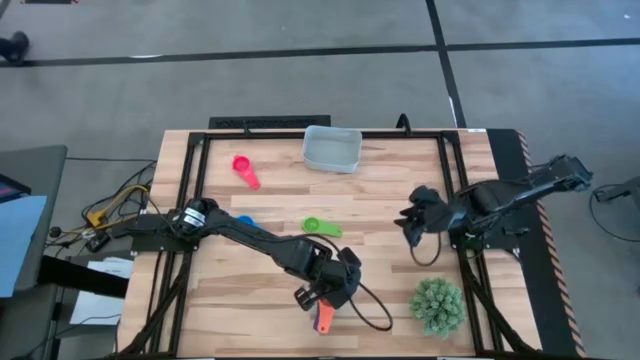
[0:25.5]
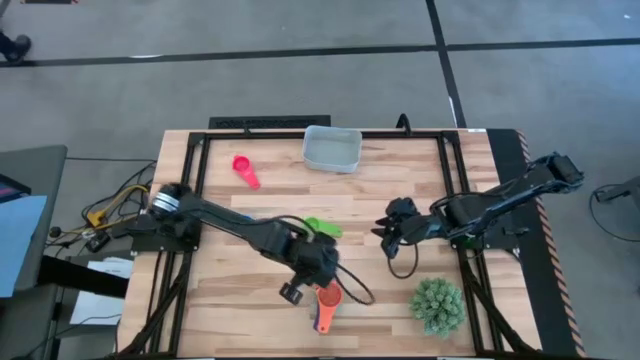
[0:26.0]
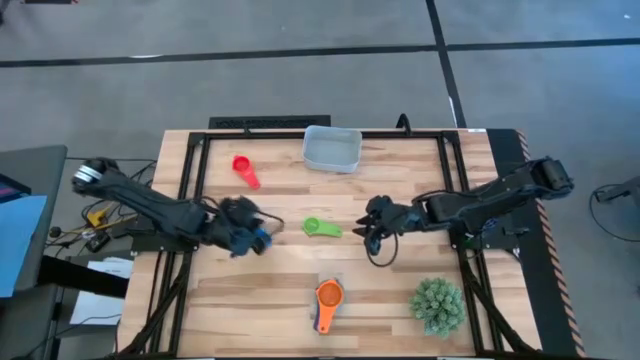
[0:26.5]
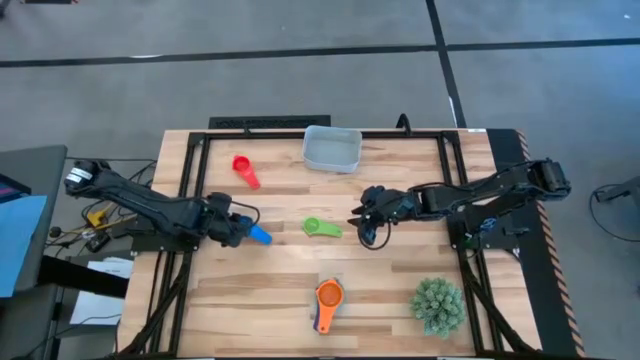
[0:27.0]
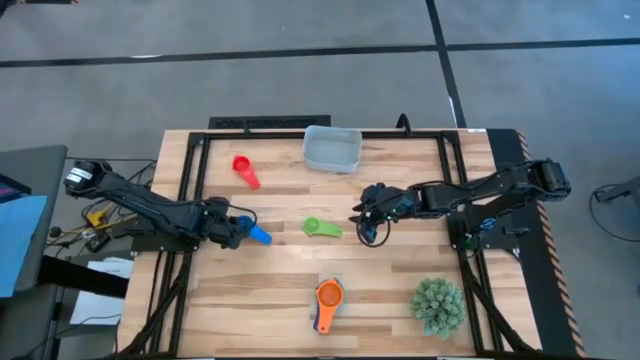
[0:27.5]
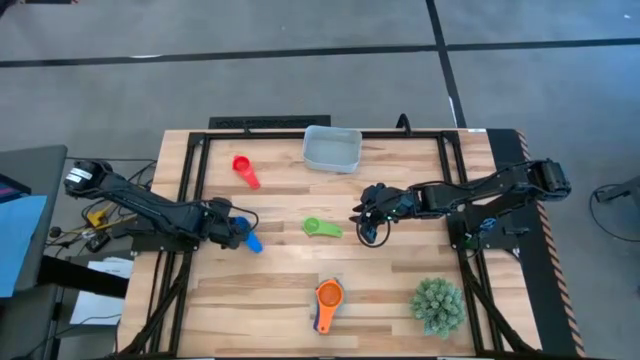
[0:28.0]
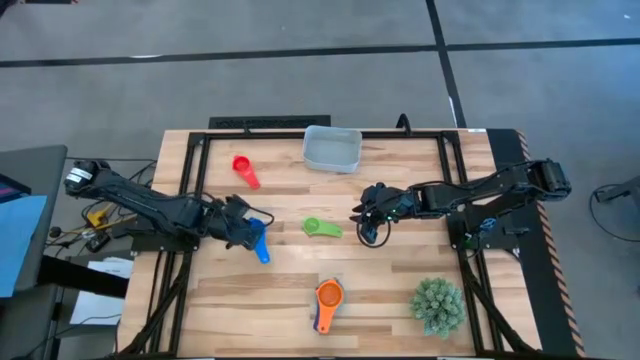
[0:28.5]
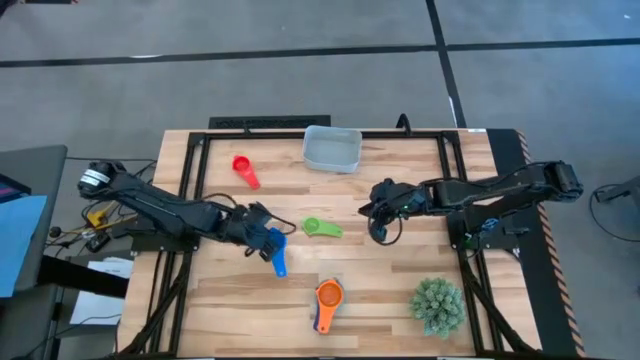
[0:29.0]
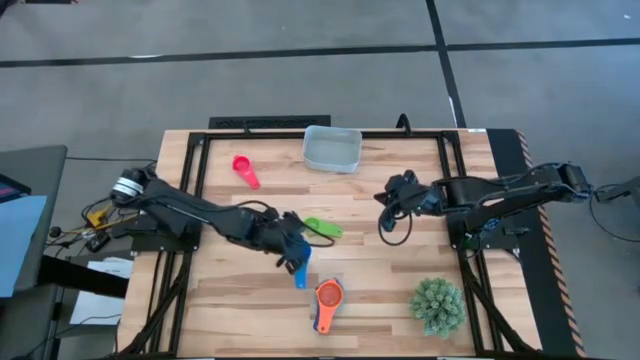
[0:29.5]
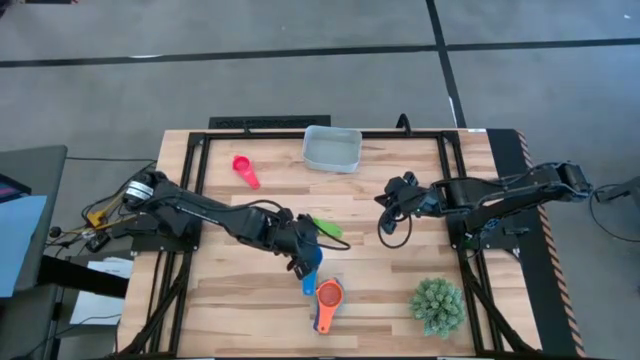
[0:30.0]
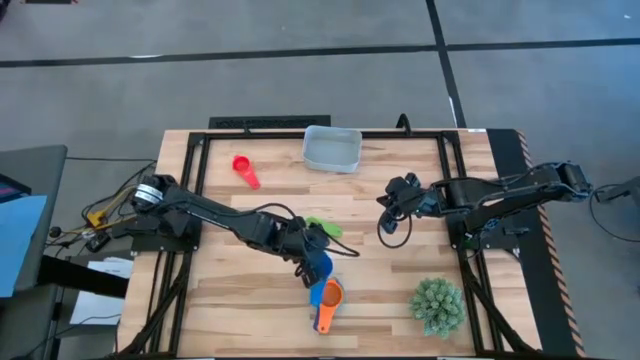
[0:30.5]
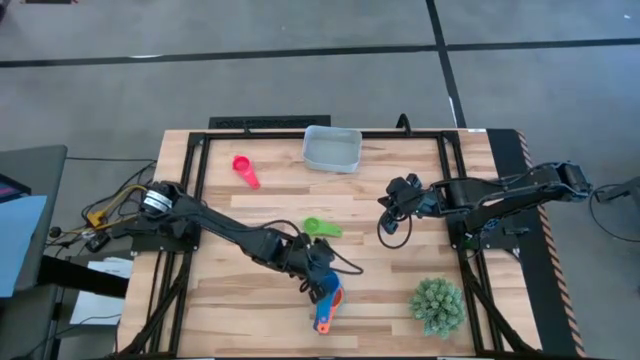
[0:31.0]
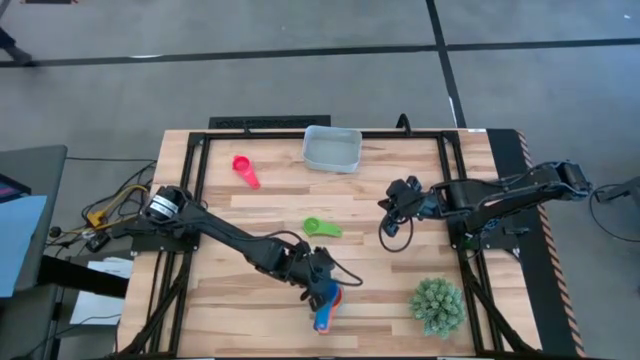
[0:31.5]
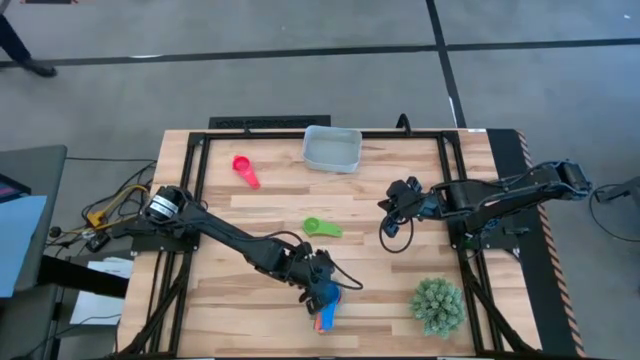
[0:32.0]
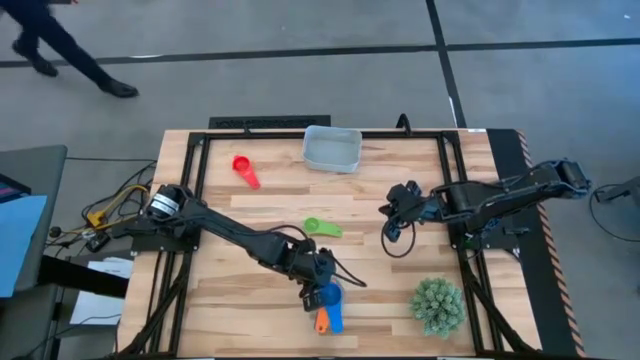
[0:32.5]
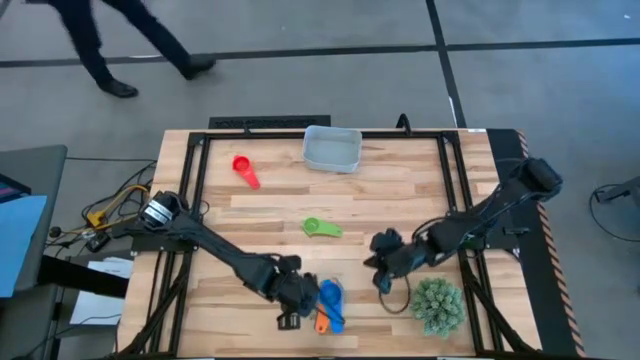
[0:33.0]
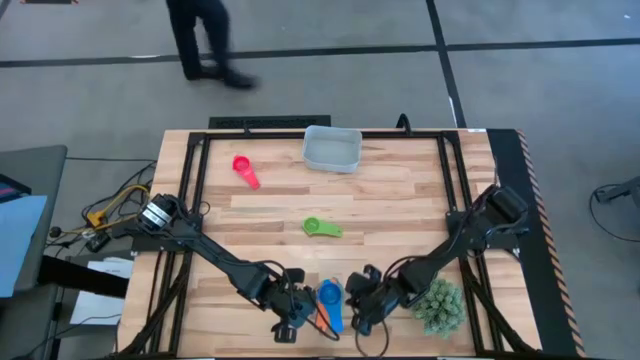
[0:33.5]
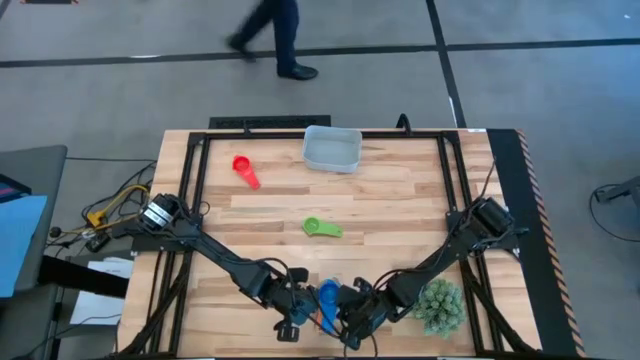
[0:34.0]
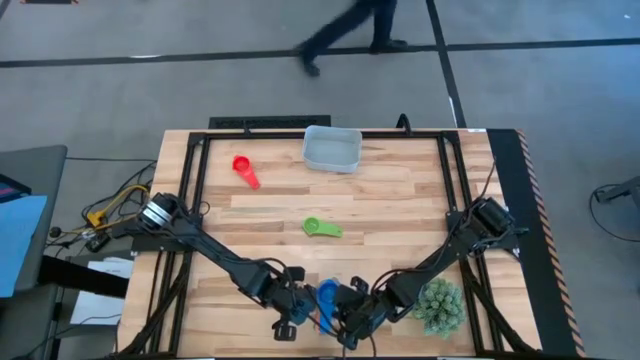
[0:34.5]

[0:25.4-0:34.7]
Task: Nest measuring cups in basket
Stack the blue measuring cup on top of the orange measuring cup

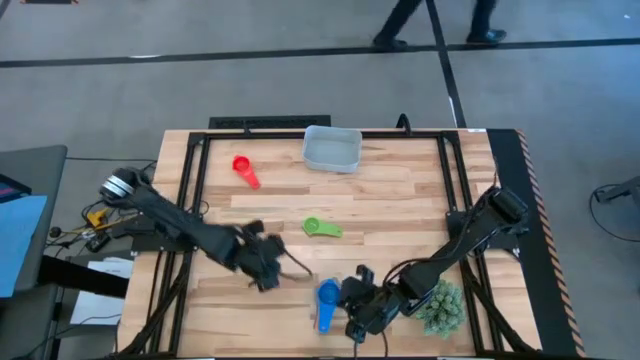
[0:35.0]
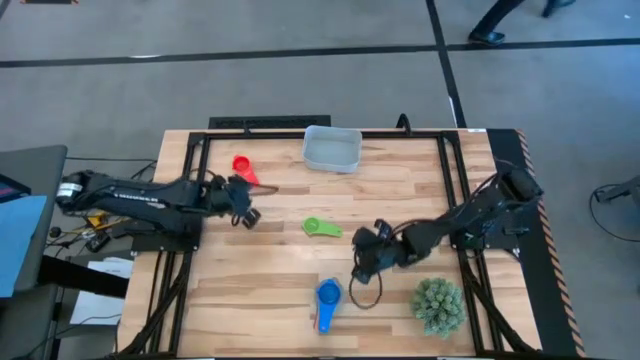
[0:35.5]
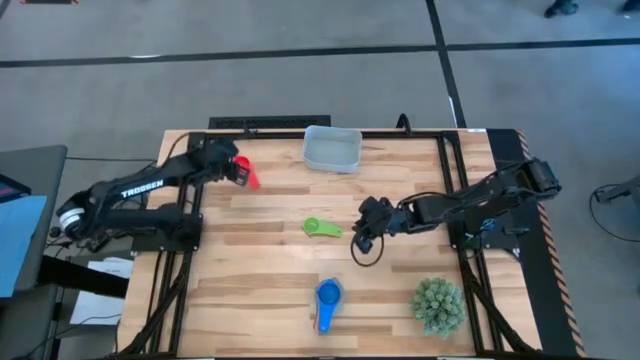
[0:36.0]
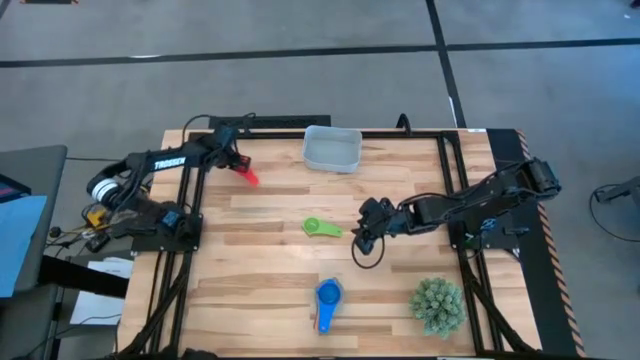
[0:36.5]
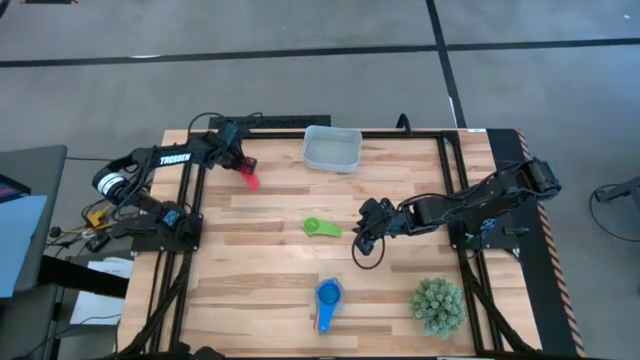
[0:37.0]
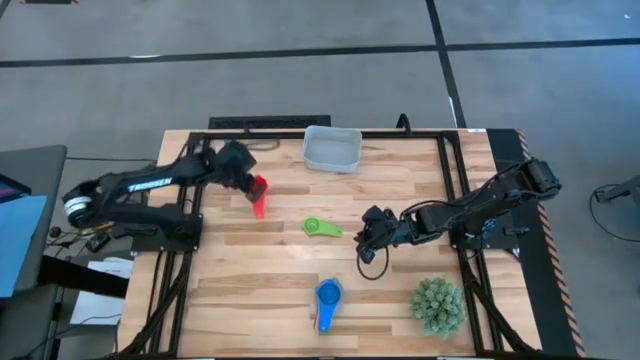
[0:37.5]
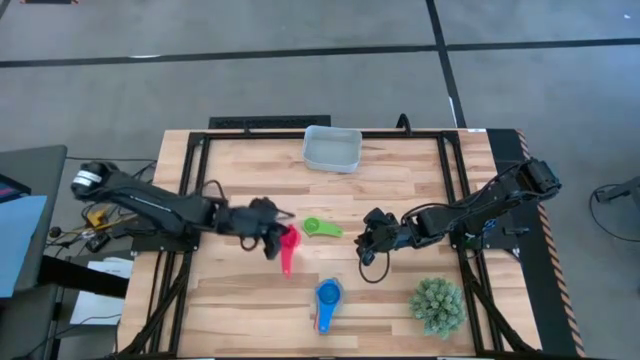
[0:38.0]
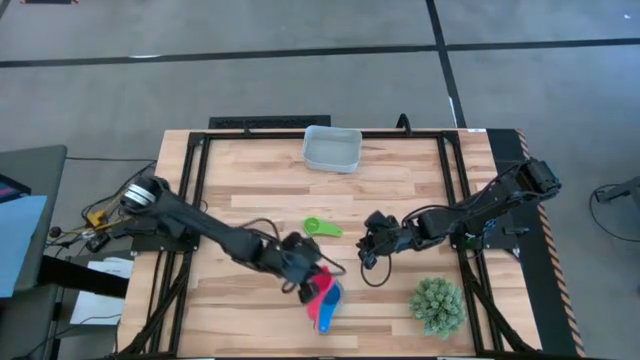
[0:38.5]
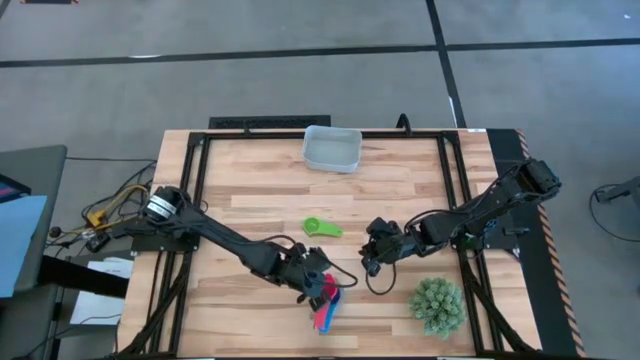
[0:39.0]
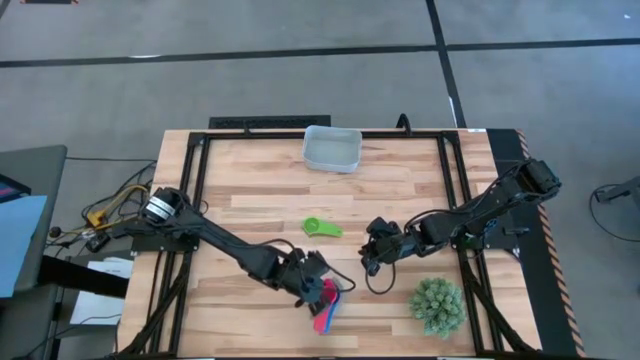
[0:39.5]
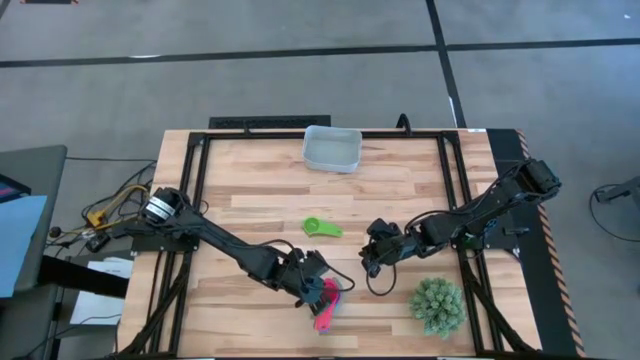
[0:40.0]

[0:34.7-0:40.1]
Stack the red measuring cup on top of the blue measuring cup

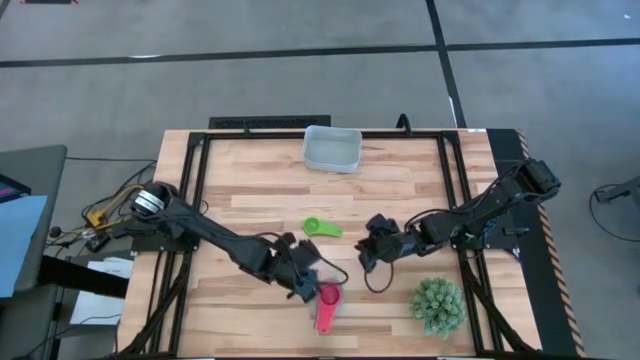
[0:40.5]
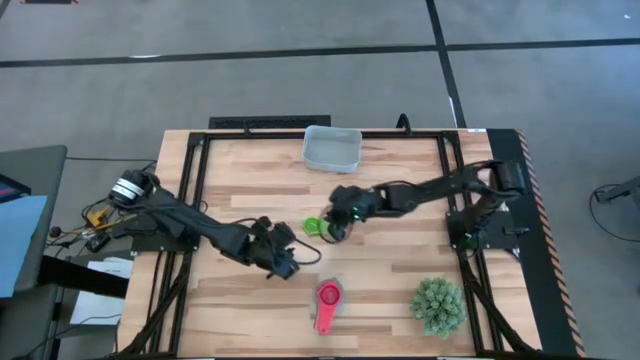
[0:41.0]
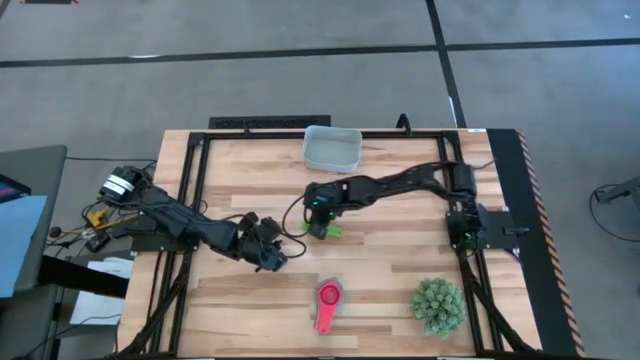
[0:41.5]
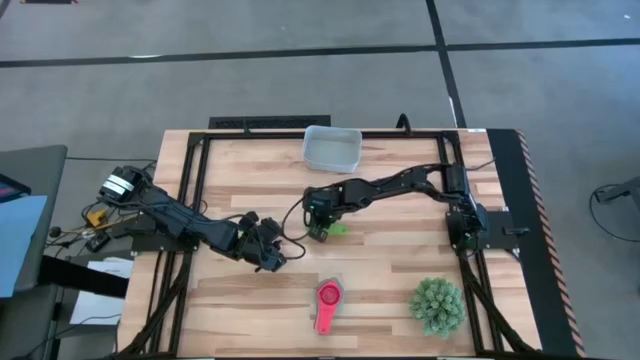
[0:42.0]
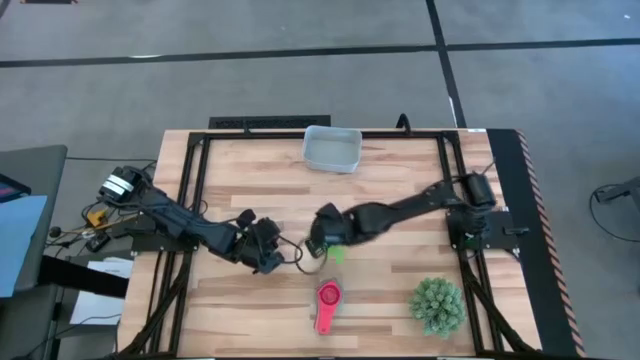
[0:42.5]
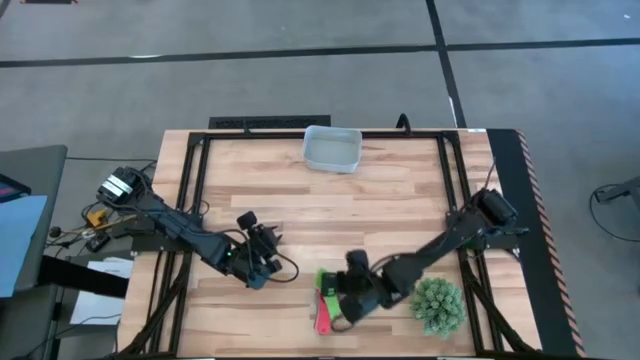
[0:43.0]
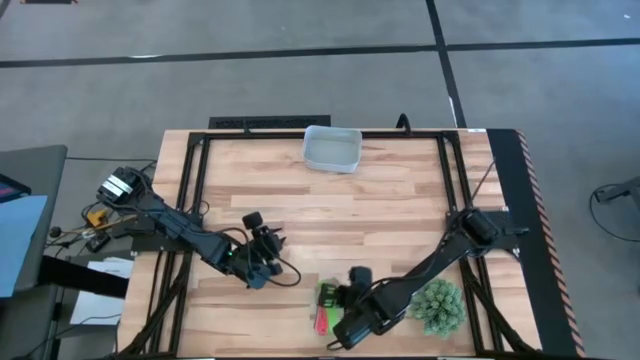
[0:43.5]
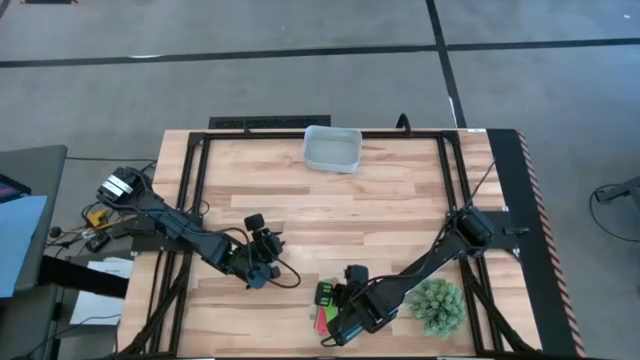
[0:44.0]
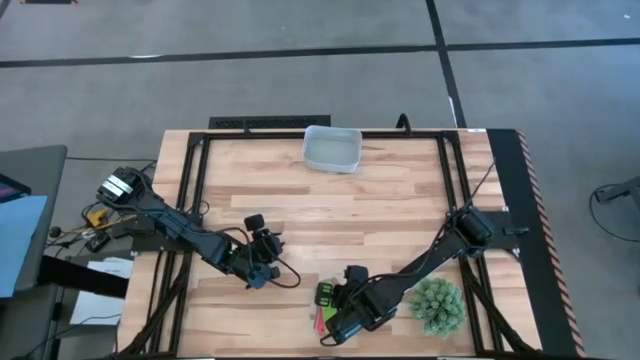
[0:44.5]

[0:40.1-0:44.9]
Stack the green measuring cup on top of the red measuring cup

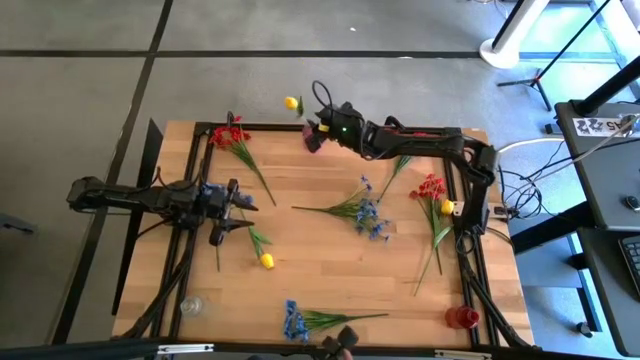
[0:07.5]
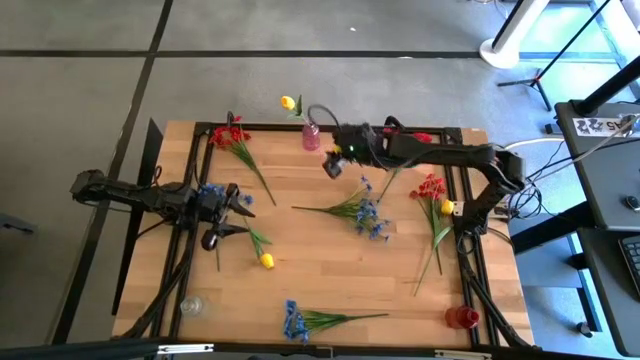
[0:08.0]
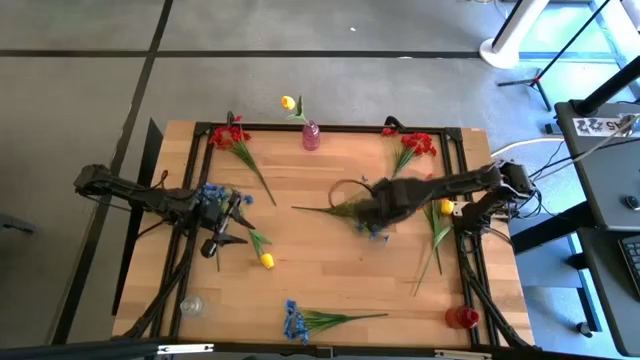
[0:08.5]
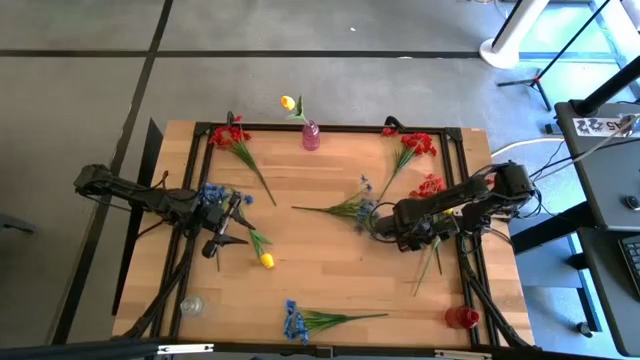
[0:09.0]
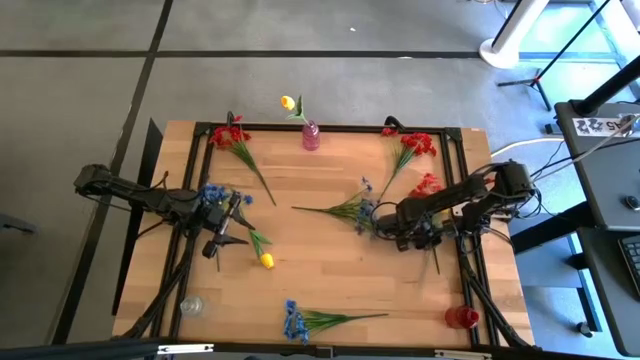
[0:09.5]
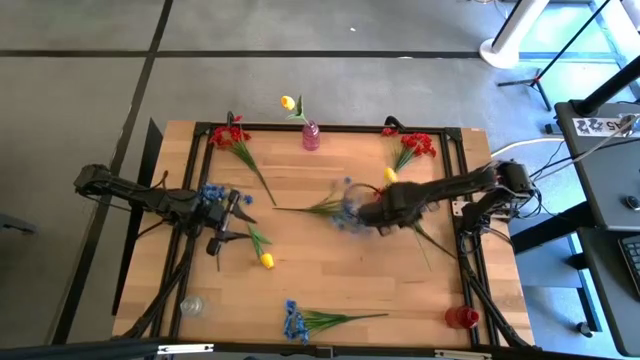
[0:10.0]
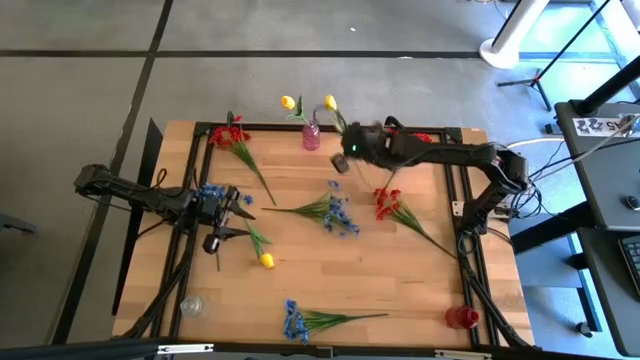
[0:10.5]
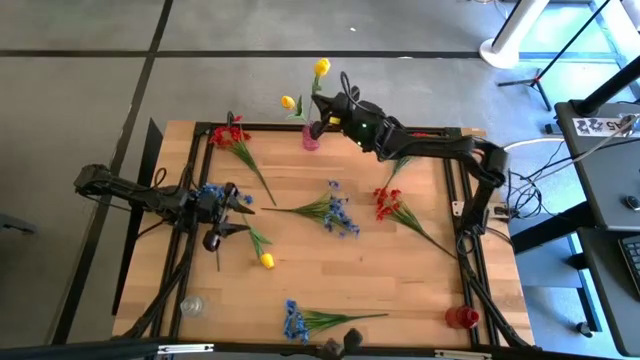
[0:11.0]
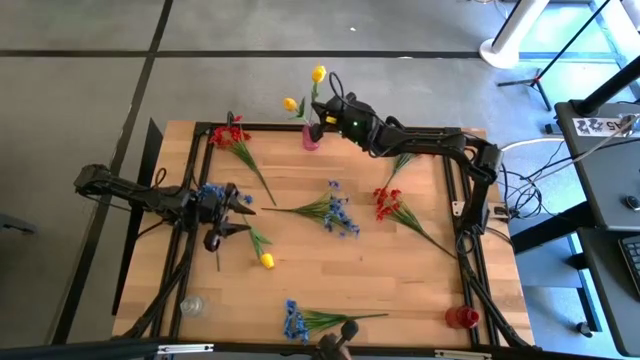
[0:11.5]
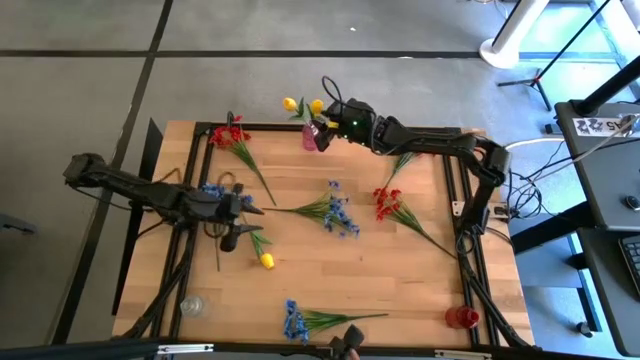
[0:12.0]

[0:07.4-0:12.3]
Task: Sort flowers into vase by color
Put the right yellow flower into the pink vase
